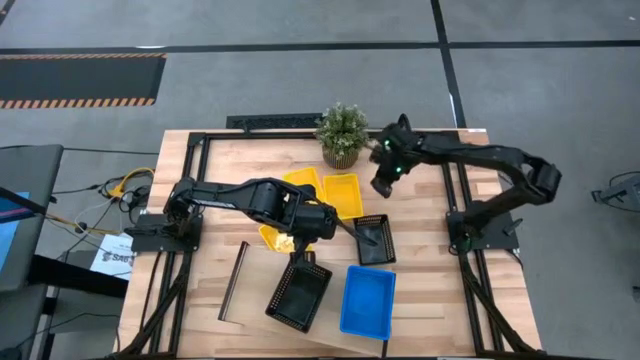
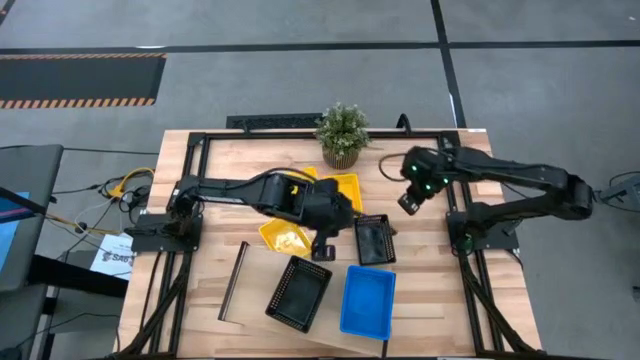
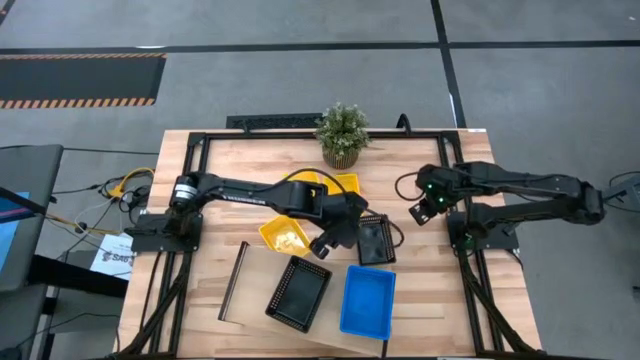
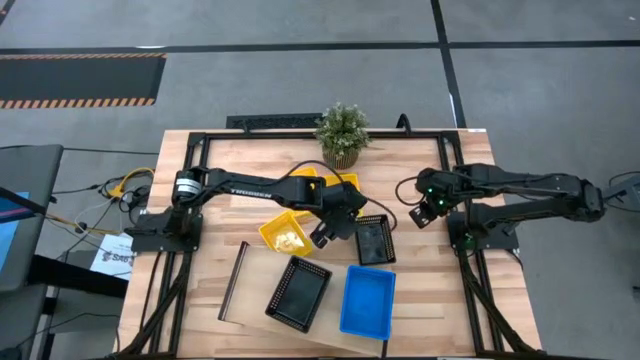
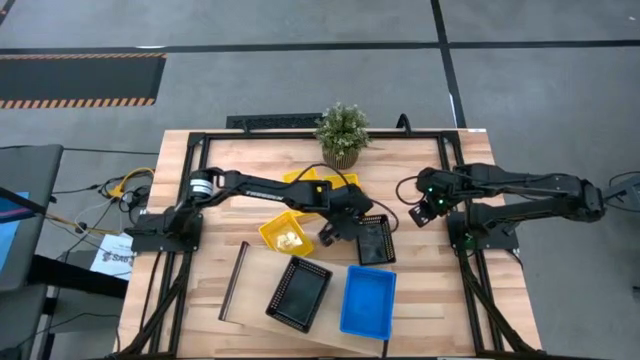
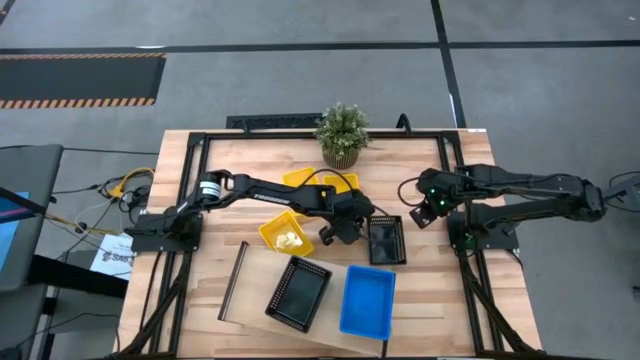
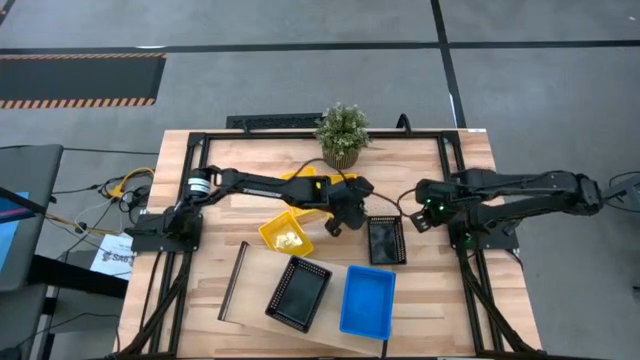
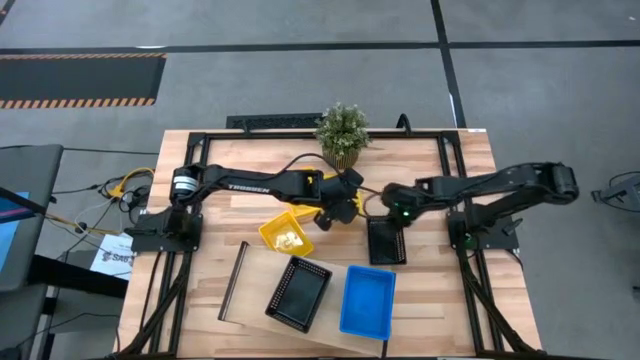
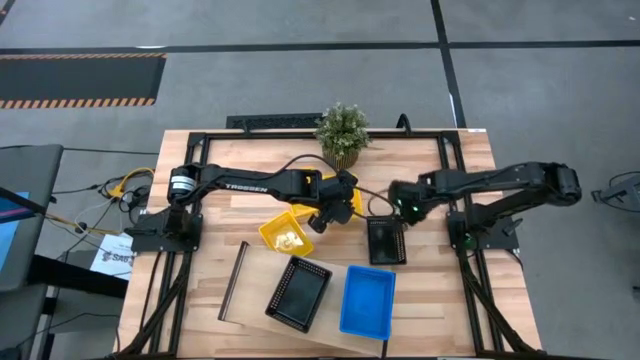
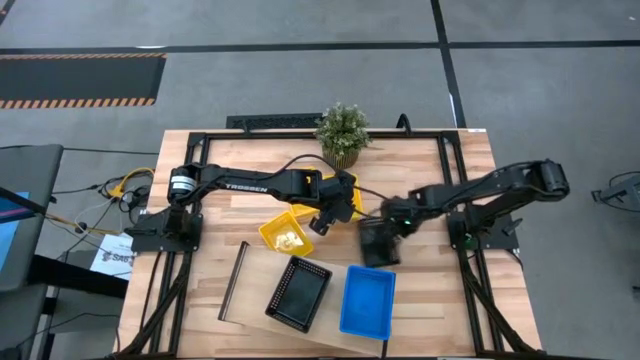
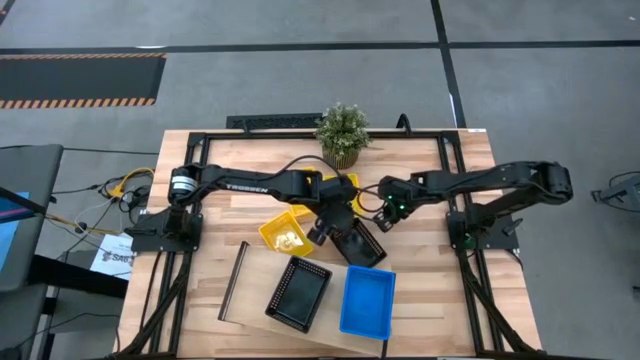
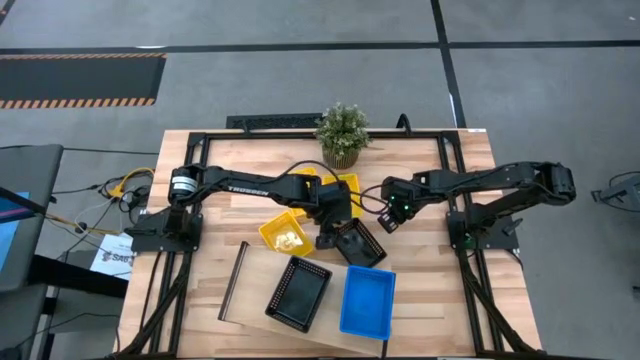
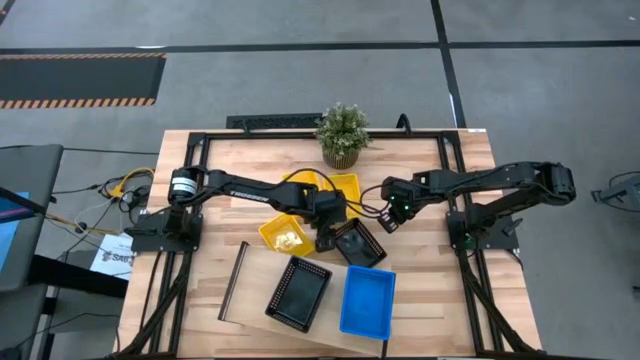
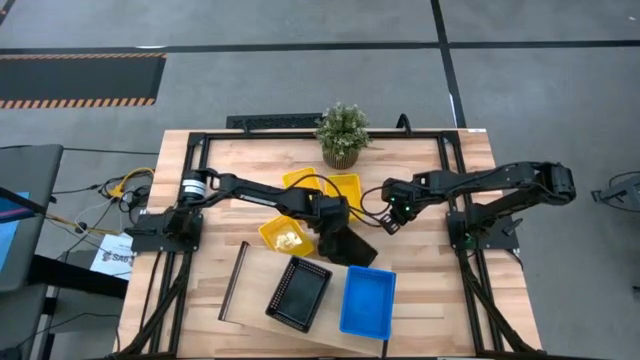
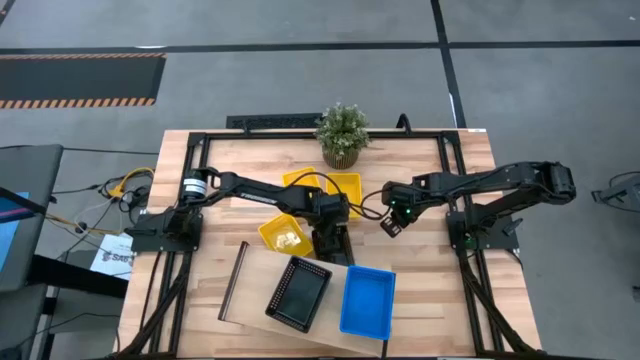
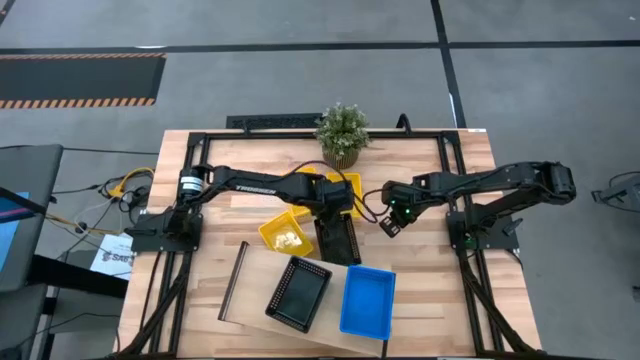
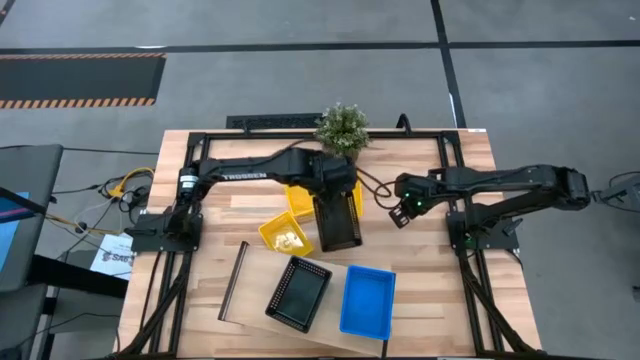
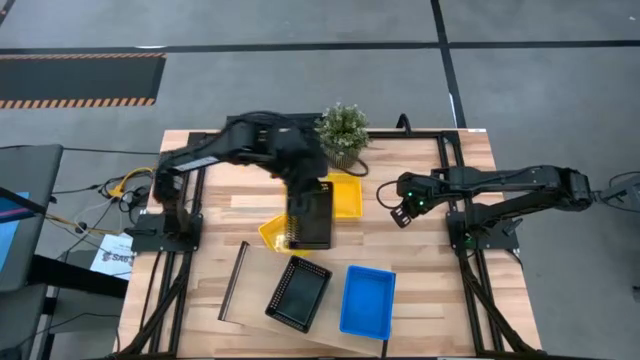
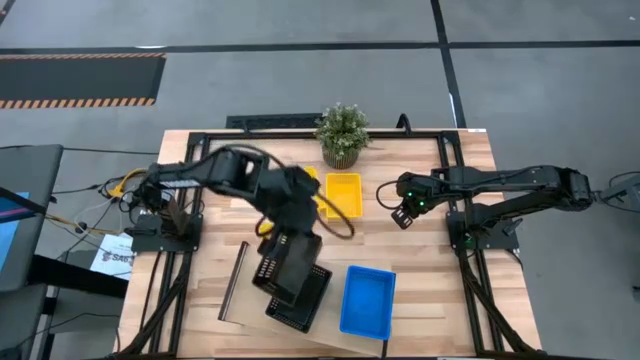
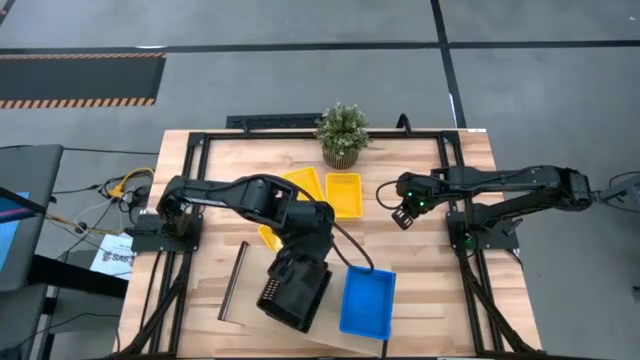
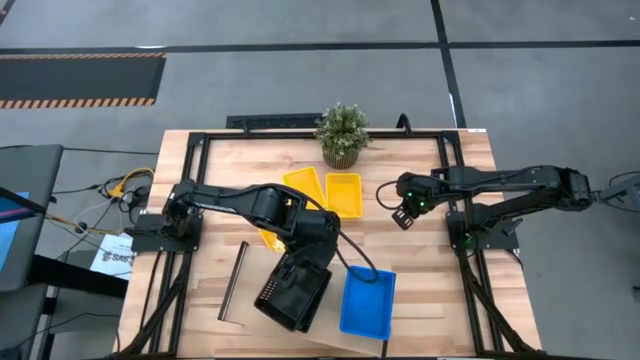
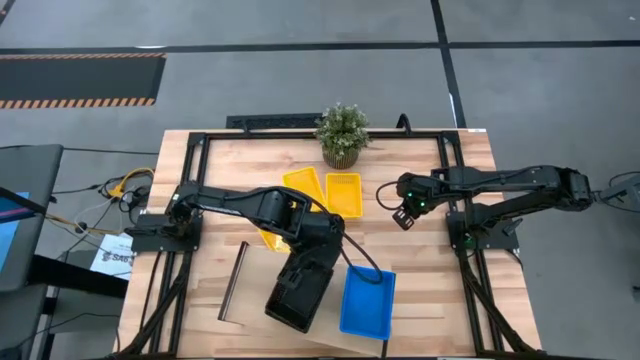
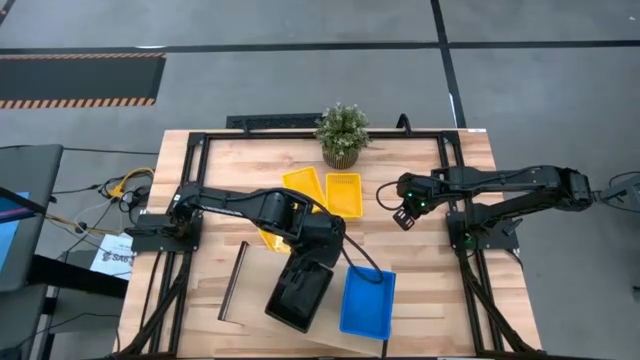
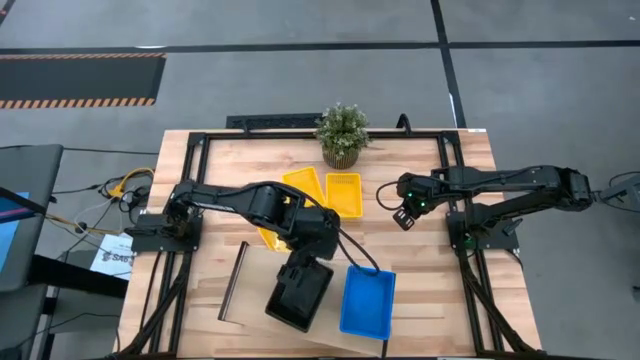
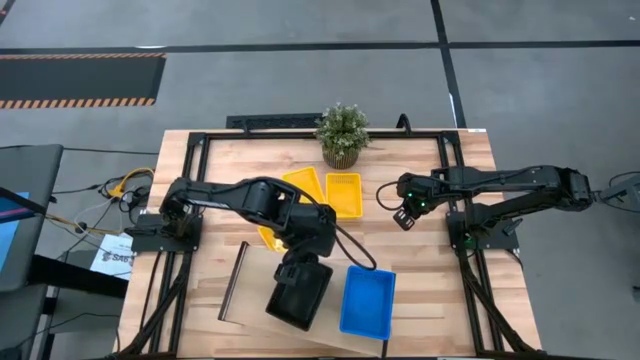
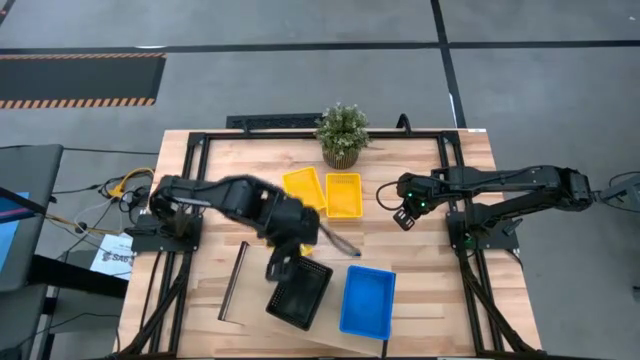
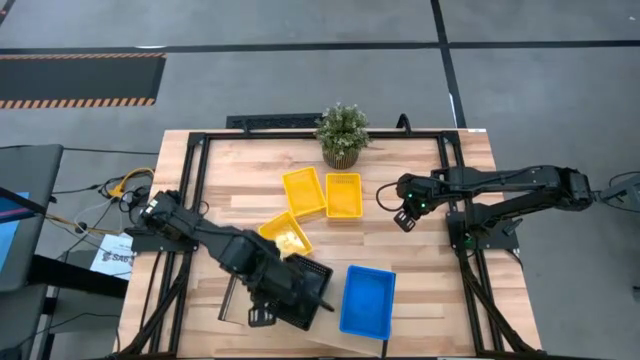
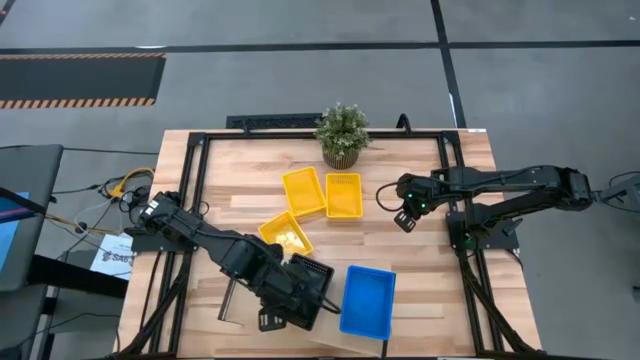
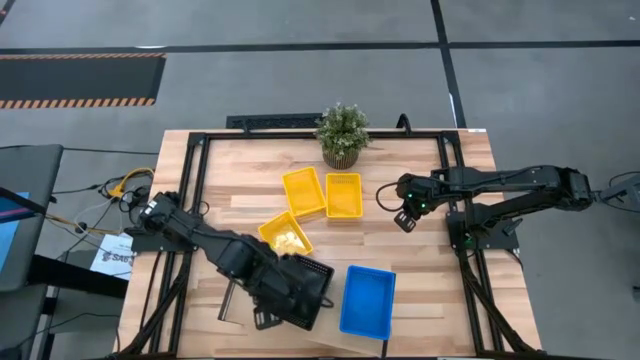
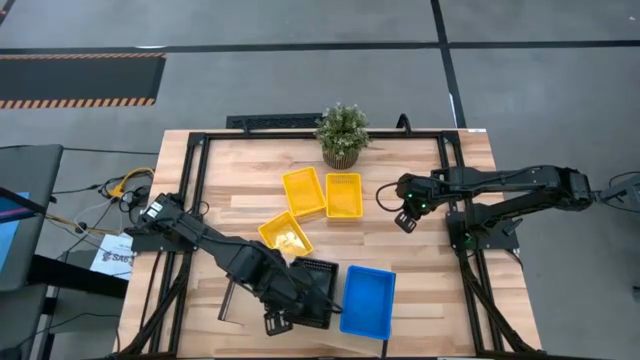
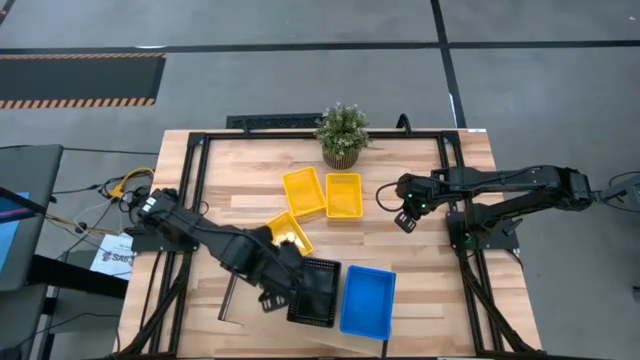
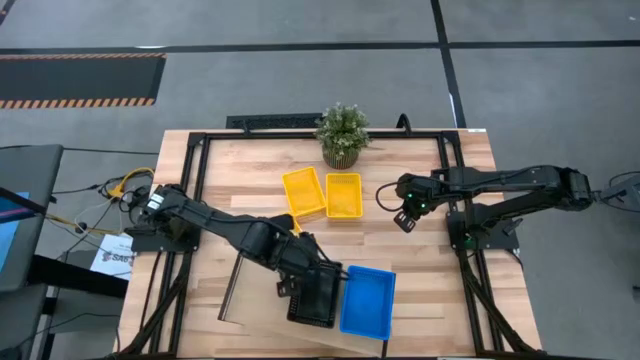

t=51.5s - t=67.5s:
Task: Stack baskets on shelf by color
Stack the black bin on top of the black bin on the shelf

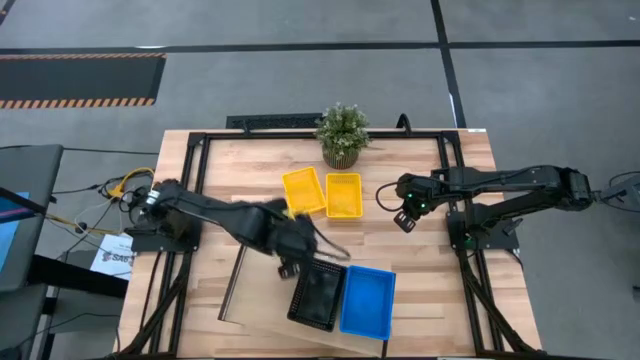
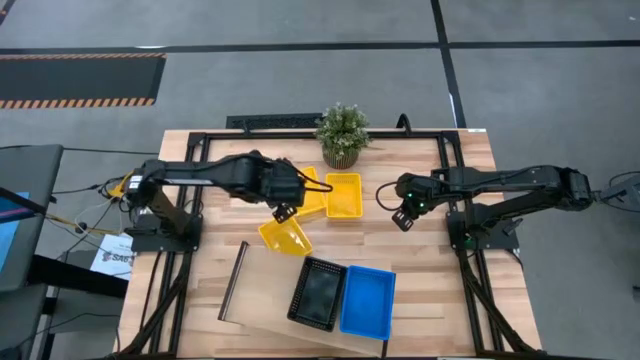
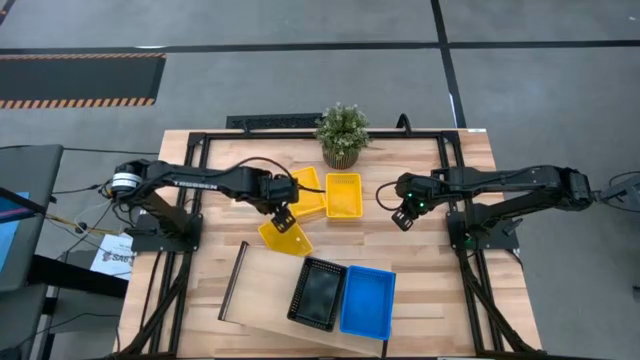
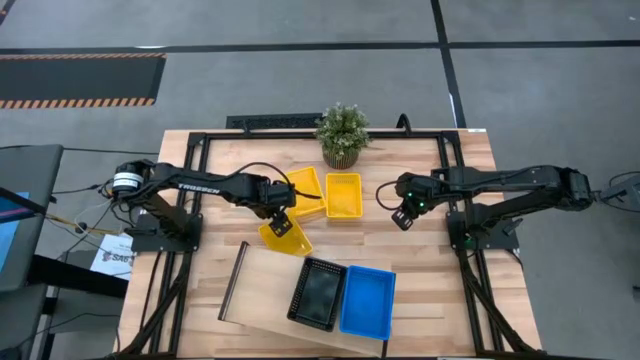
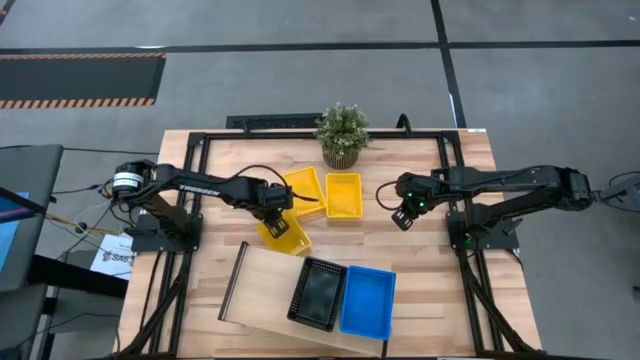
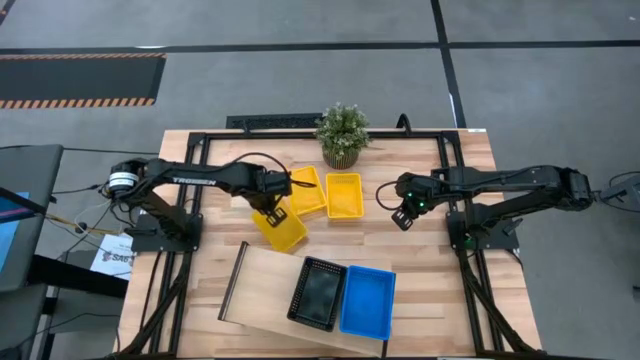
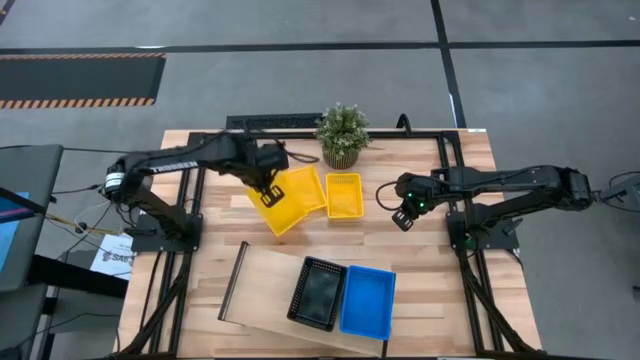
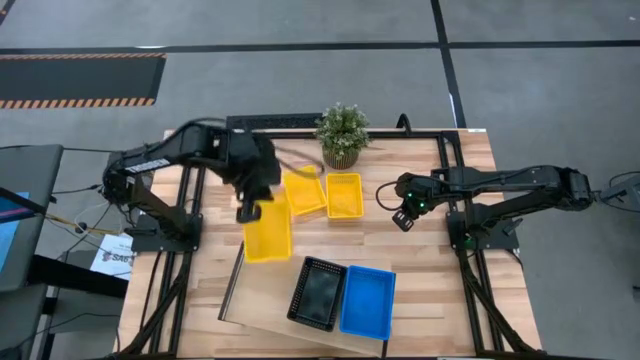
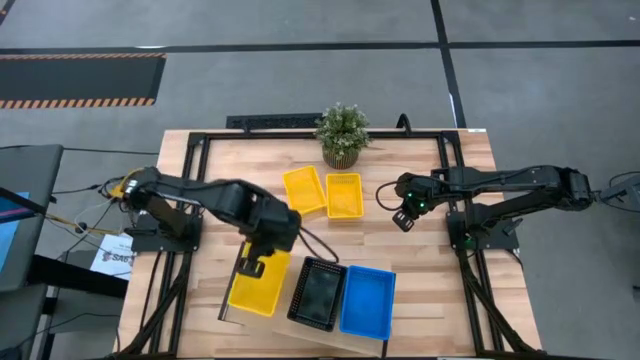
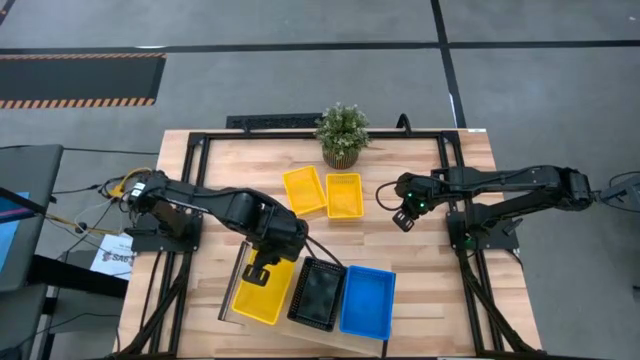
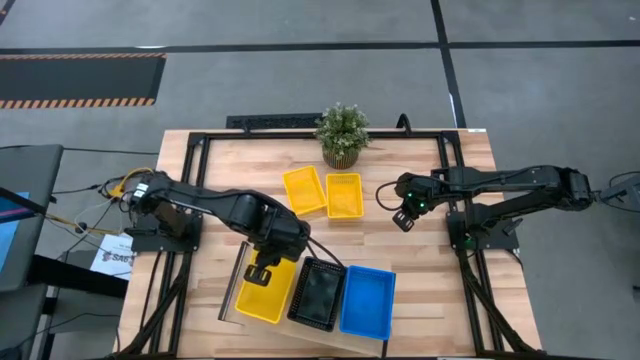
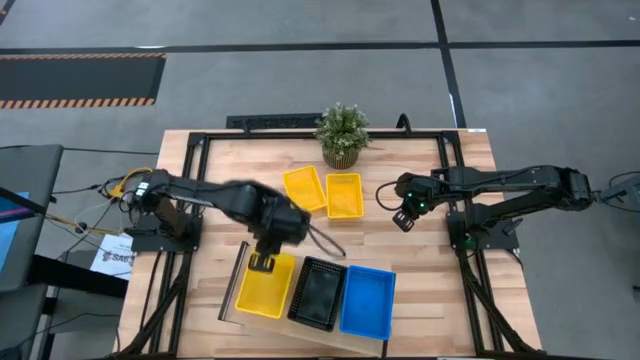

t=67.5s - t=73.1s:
Put the bottom yellow bin on the shelf
